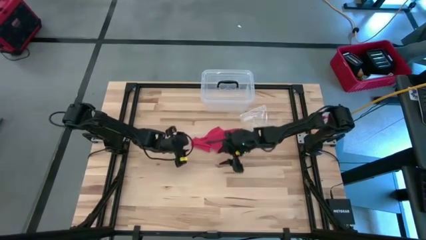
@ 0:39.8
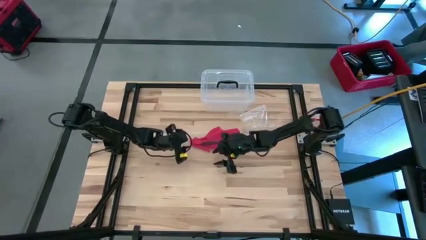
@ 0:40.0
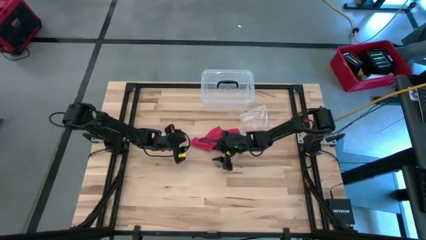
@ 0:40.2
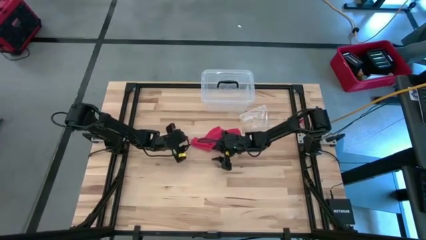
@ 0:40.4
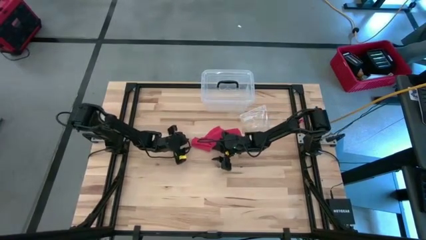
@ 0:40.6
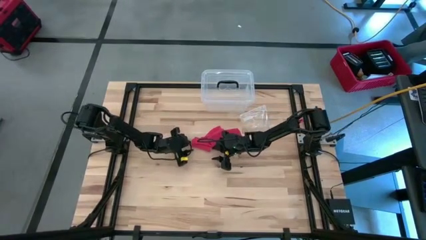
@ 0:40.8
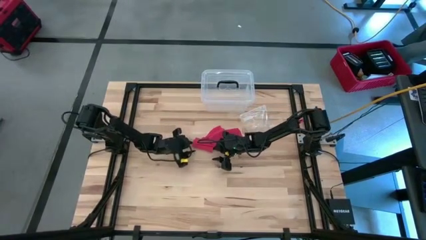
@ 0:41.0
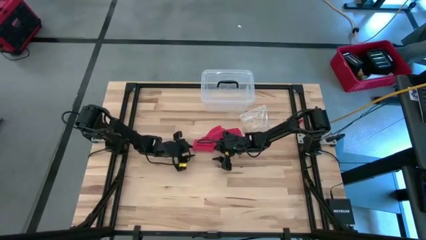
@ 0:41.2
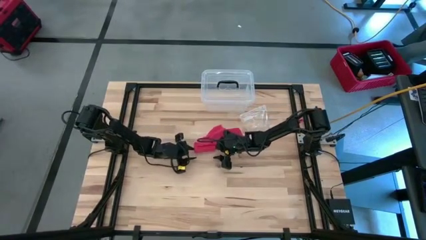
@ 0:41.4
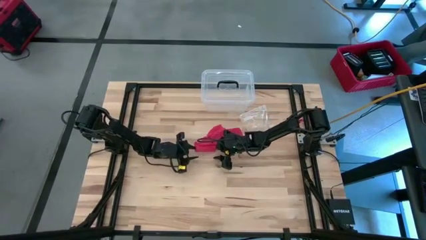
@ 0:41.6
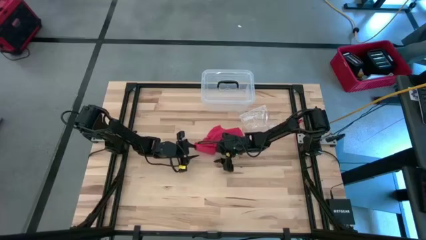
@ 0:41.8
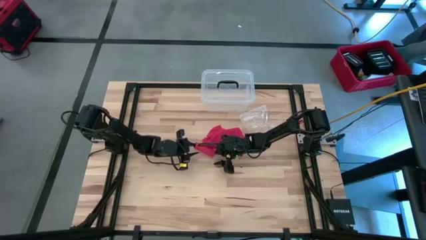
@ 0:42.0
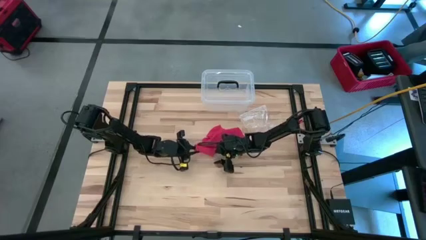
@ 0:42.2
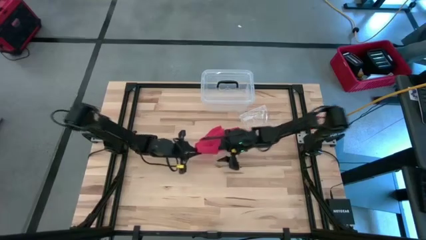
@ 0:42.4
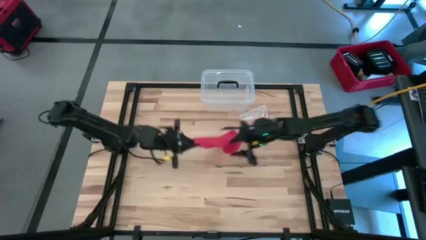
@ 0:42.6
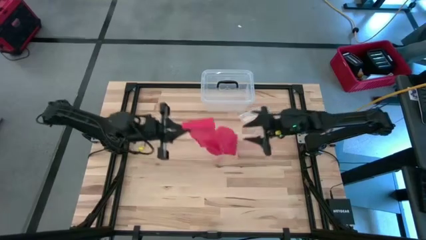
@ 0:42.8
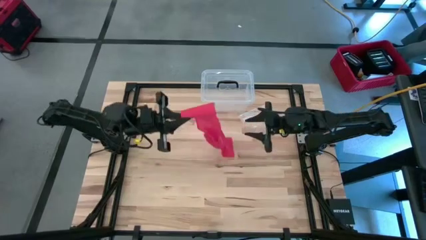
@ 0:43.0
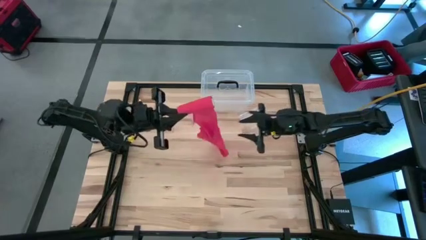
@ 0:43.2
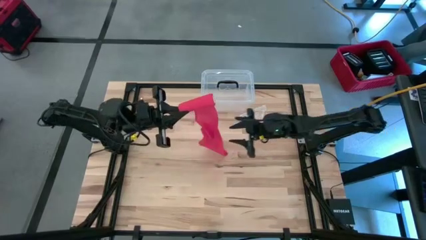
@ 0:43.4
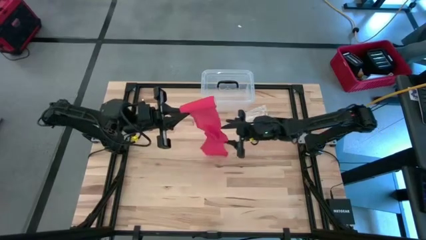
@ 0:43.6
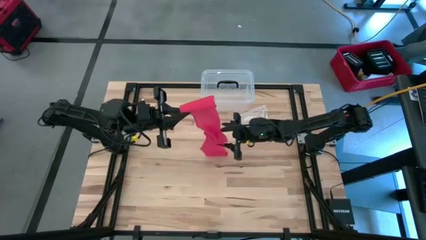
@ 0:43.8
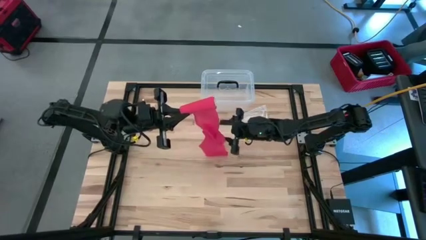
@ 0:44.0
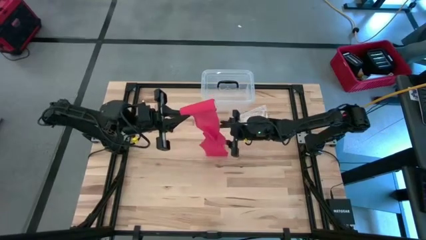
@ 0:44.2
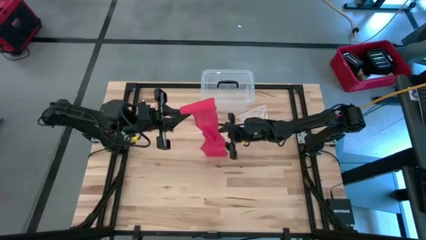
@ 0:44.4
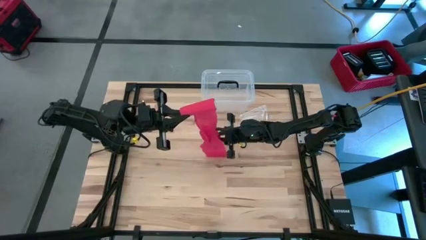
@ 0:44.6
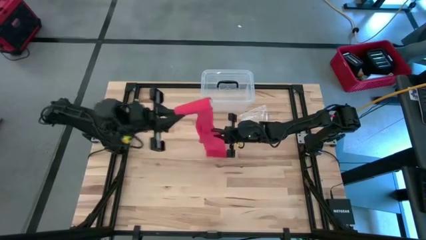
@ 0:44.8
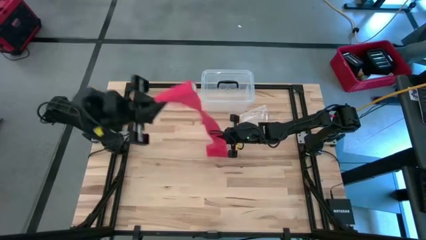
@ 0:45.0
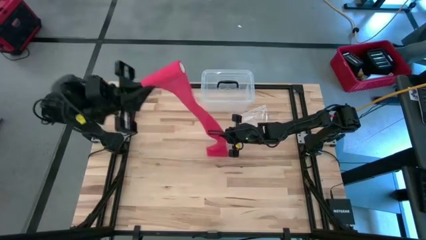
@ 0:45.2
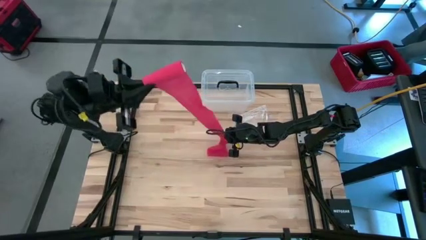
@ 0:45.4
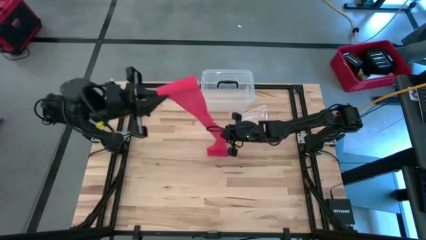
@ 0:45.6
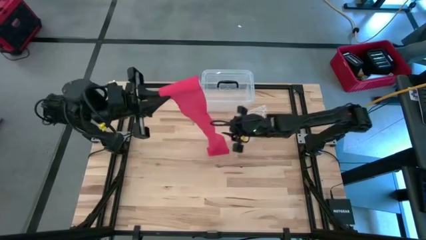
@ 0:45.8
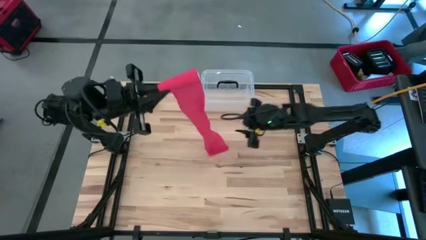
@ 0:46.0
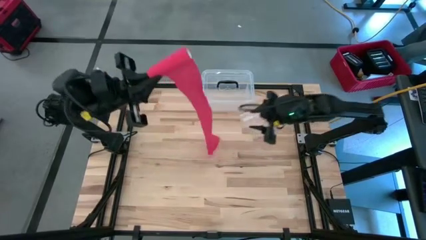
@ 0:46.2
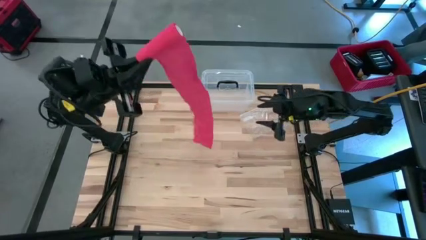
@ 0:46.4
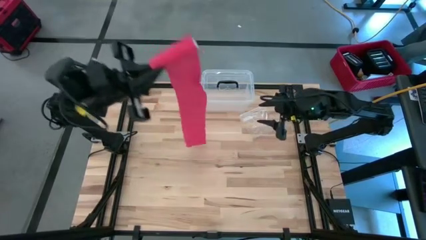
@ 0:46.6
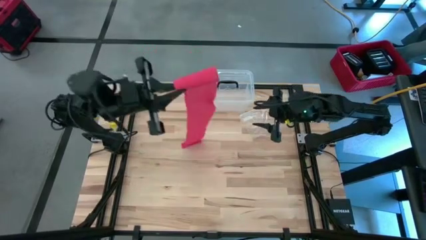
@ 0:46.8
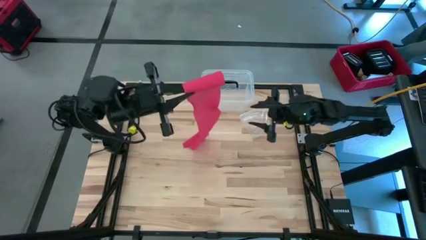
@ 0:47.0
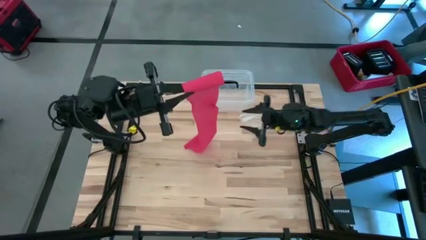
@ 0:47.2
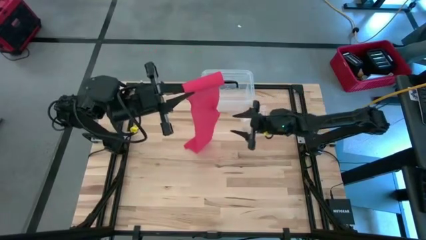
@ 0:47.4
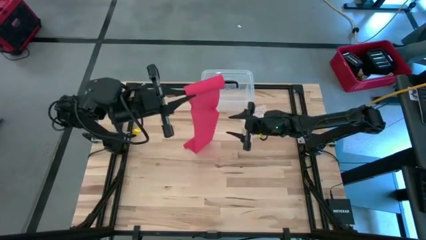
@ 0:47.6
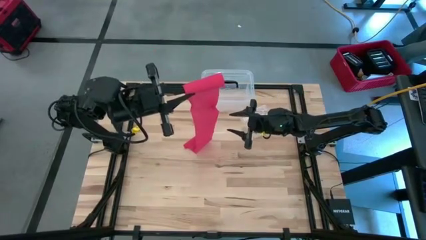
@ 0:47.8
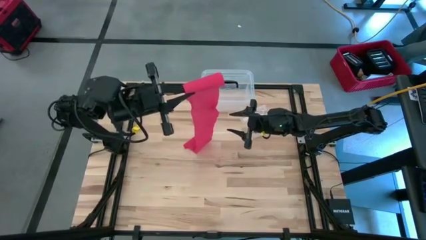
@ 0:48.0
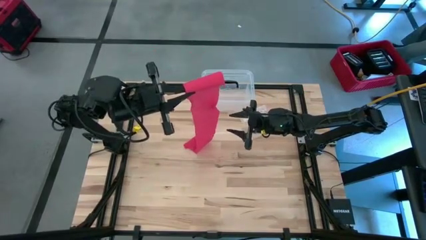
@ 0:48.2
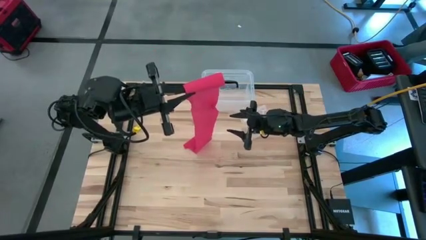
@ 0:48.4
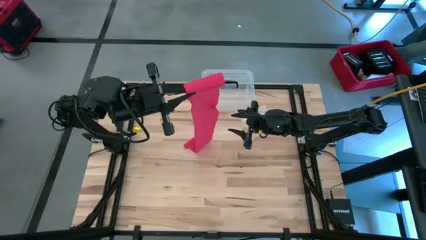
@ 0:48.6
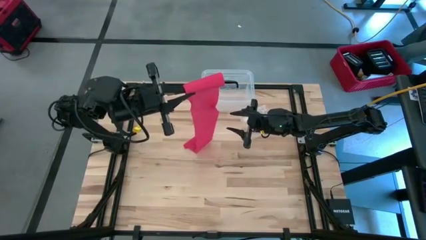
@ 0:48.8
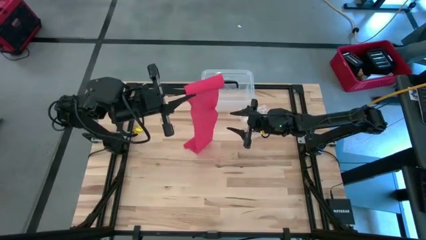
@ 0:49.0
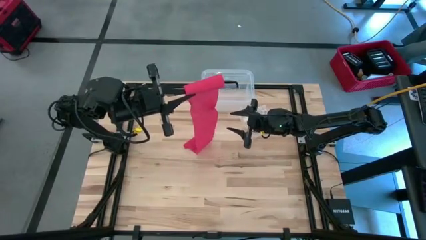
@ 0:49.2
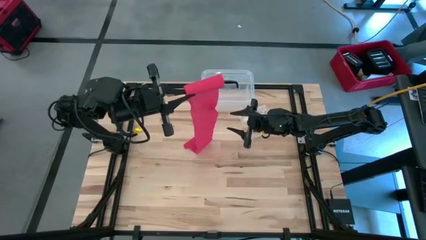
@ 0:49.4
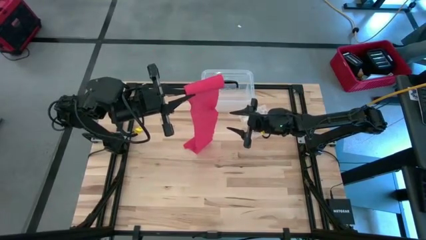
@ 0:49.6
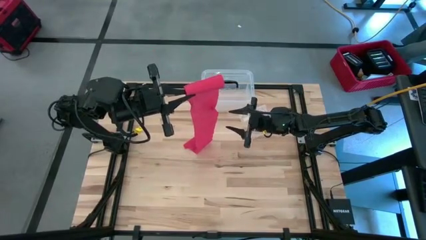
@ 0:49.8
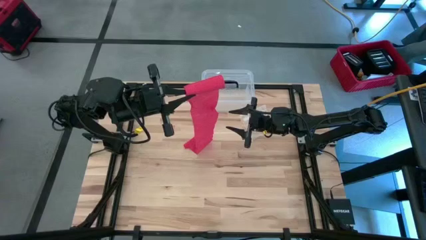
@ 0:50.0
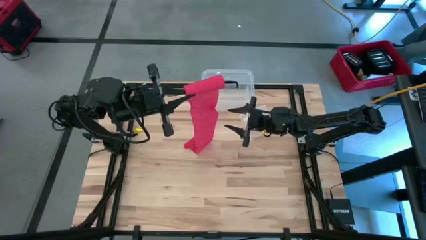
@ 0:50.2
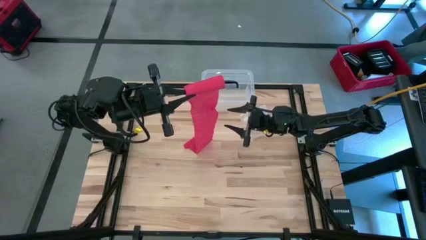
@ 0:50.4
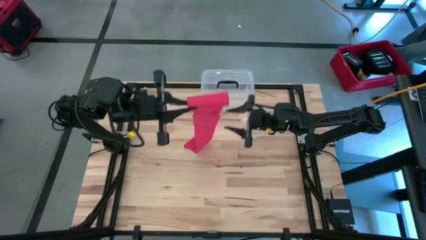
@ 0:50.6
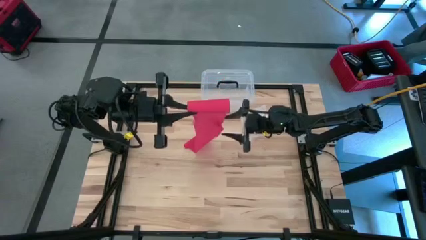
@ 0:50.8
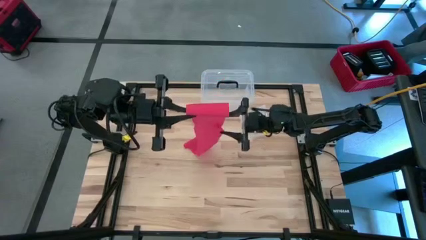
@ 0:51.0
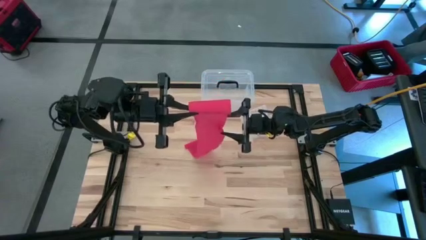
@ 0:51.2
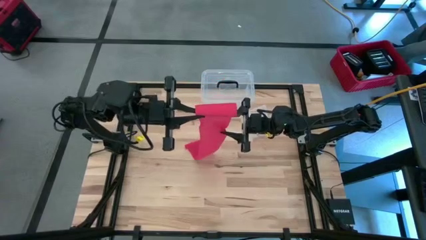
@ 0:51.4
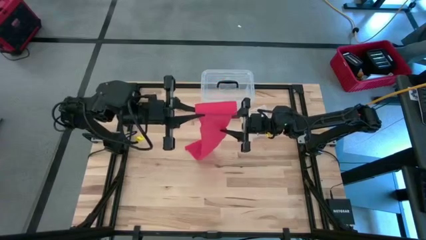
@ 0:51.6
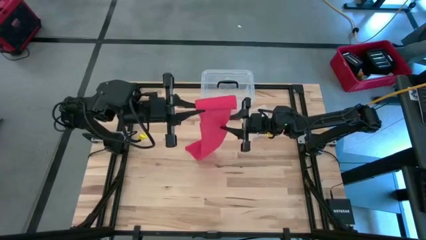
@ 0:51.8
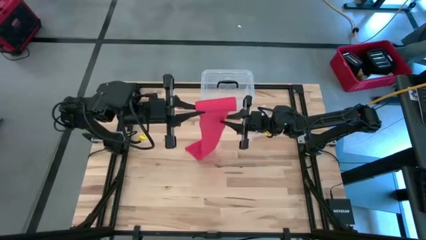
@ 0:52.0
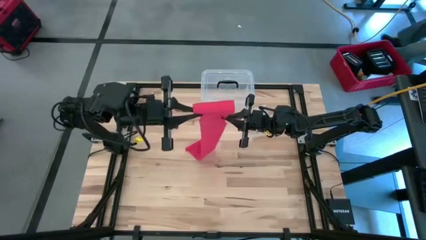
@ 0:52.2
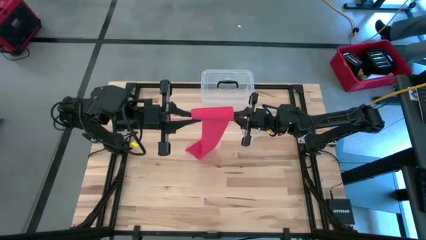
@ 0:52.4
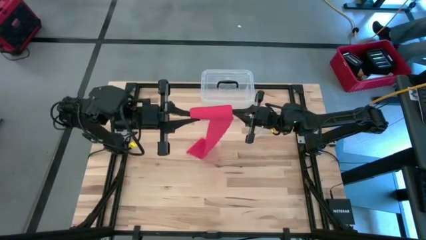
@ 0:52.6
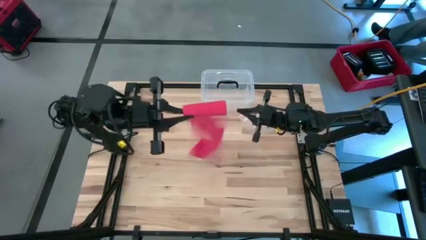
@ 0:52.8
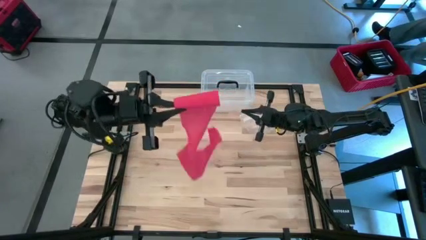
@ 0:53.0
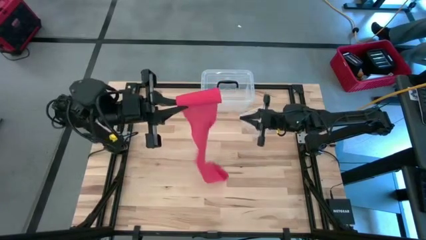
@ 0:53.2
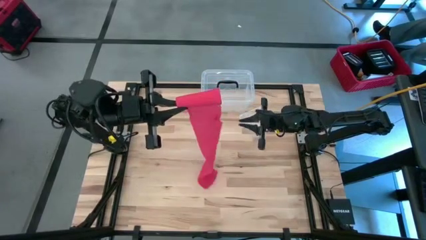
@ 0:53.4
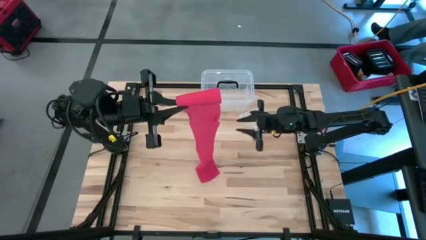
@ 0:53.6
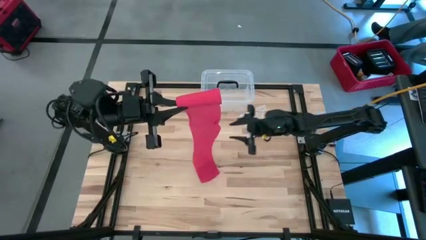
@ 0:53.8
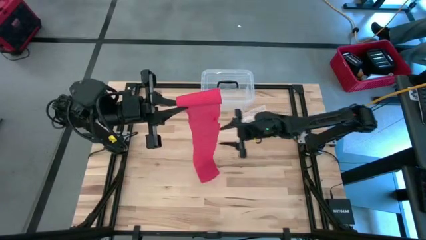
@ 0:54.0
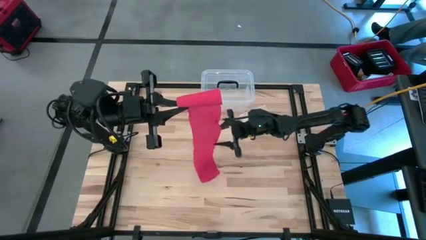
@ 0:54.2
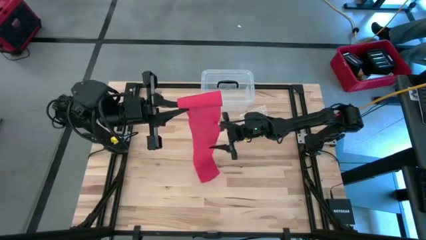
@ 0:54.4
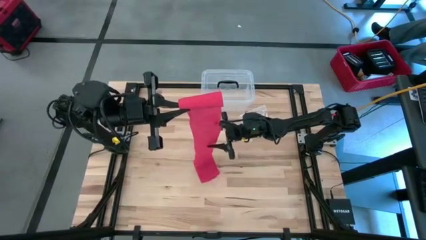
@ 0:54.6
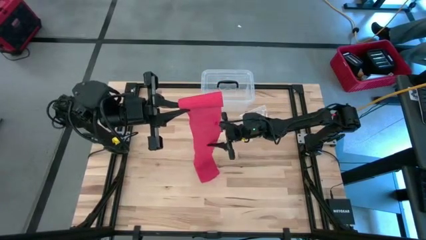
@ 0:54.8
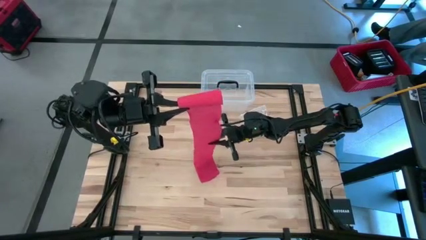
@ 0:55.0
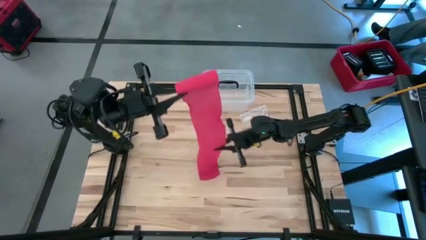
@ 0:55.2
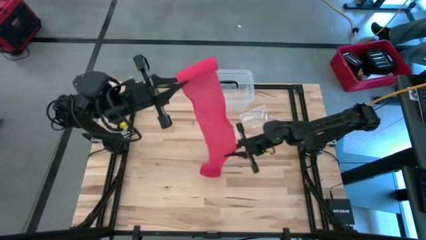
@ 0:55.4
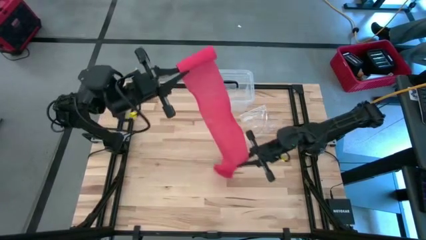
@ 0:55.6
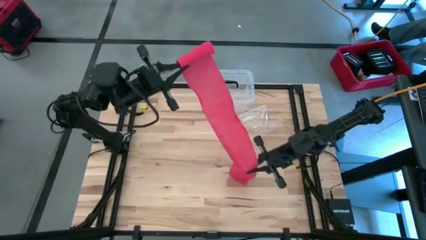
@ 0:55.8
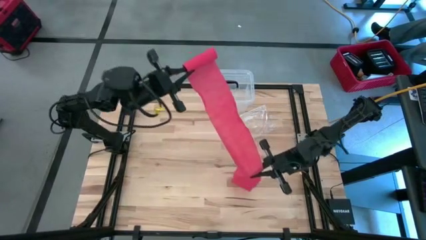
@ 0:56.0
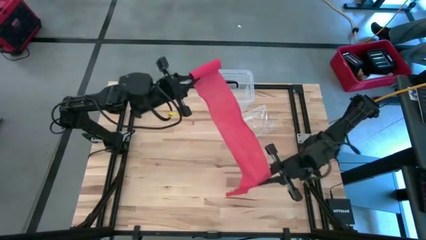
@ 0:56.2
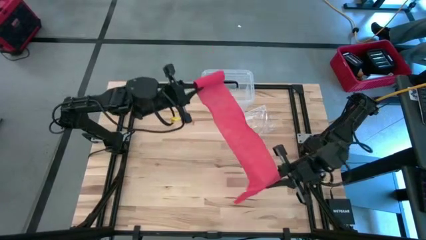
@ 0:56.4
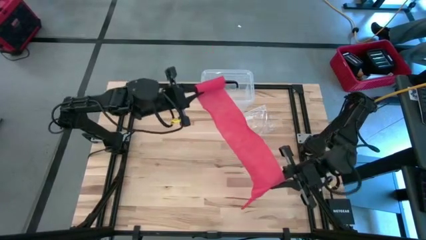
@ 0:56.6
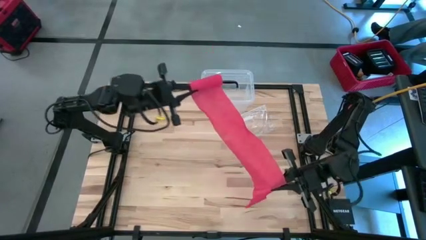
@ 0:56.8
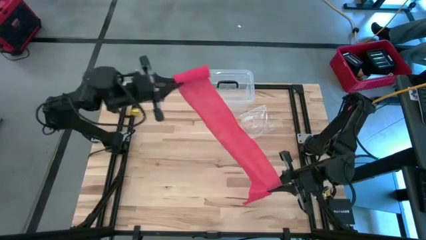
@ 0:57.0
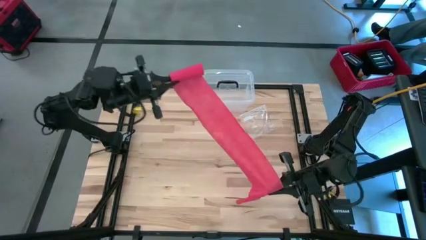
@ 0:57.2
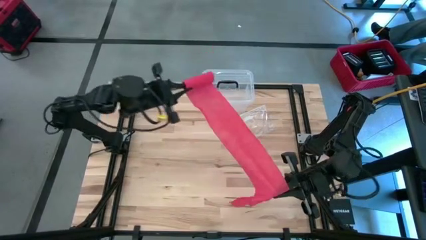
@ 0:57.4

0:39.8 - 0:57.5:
Task: Roll bandage
Roll the red bandage
